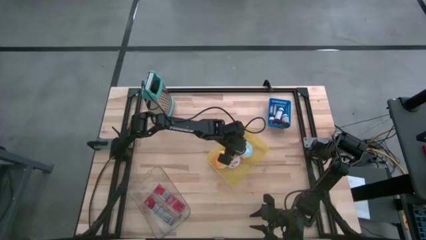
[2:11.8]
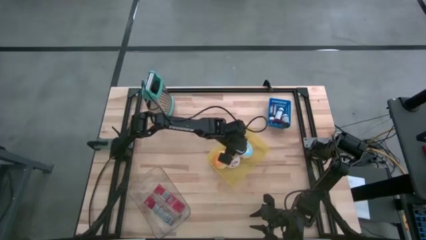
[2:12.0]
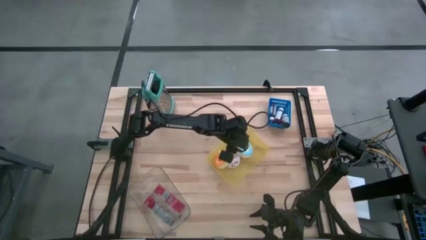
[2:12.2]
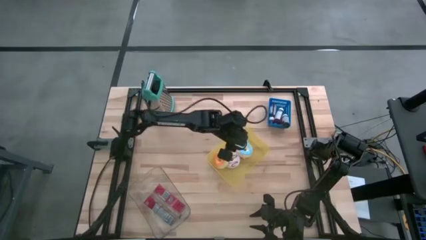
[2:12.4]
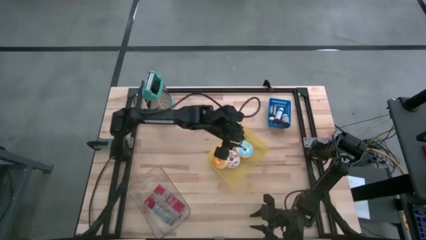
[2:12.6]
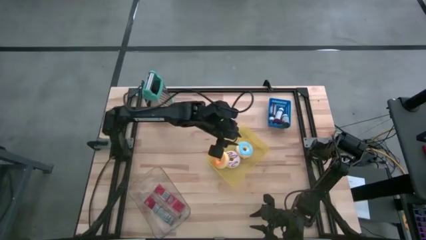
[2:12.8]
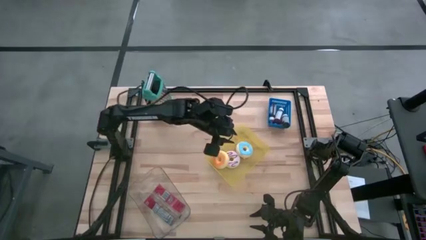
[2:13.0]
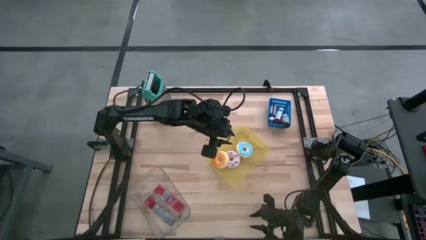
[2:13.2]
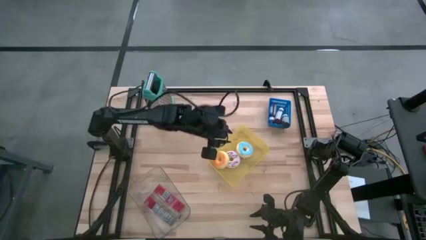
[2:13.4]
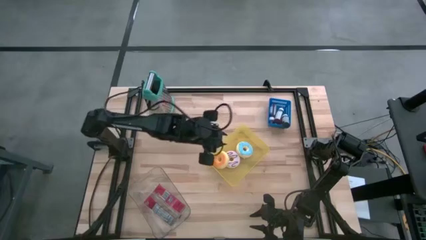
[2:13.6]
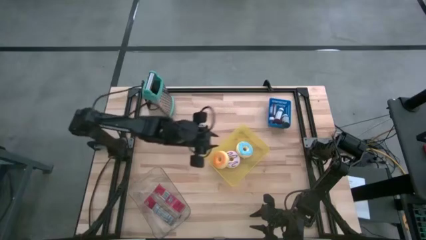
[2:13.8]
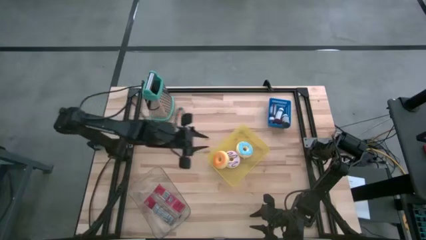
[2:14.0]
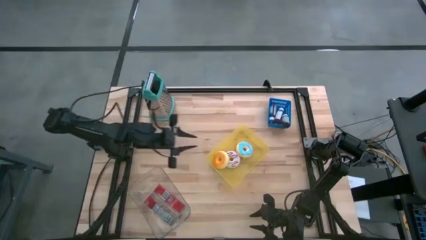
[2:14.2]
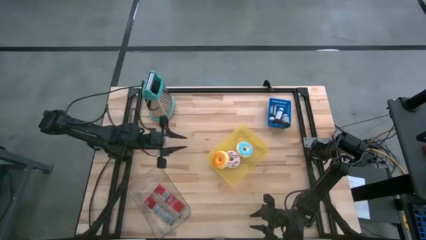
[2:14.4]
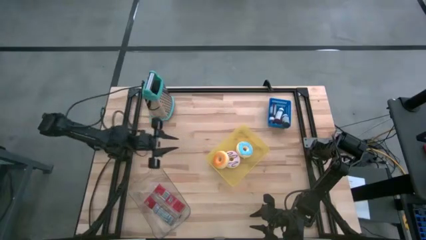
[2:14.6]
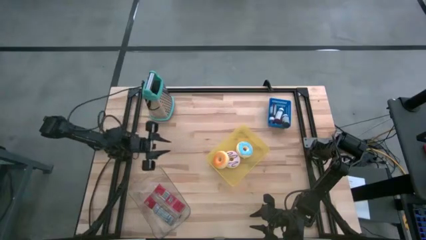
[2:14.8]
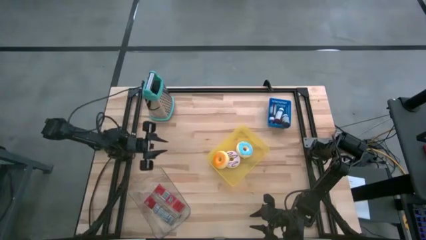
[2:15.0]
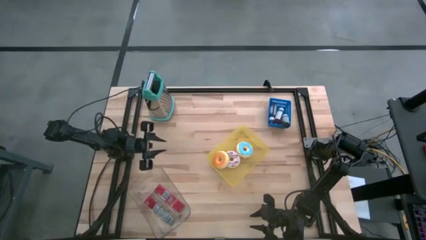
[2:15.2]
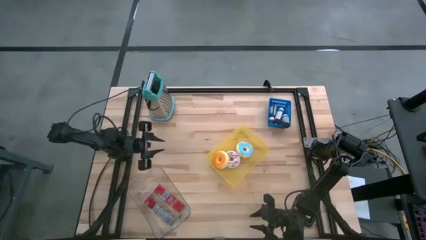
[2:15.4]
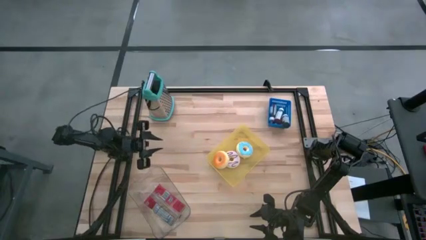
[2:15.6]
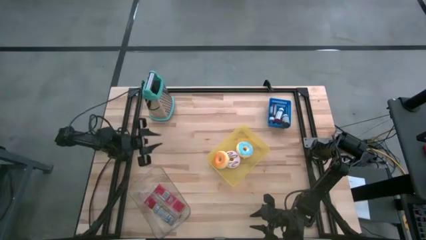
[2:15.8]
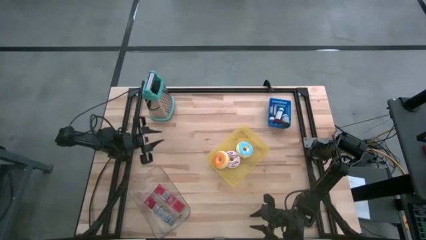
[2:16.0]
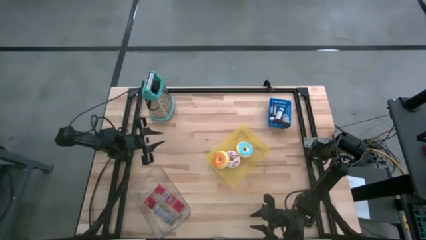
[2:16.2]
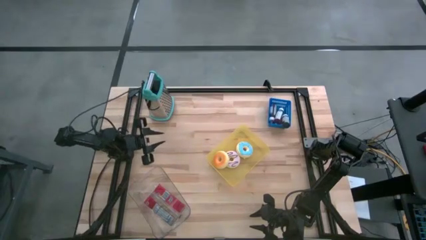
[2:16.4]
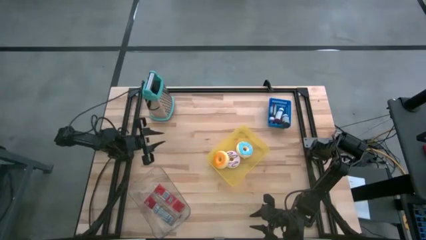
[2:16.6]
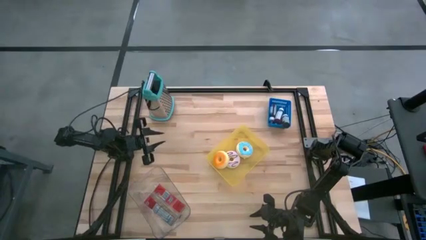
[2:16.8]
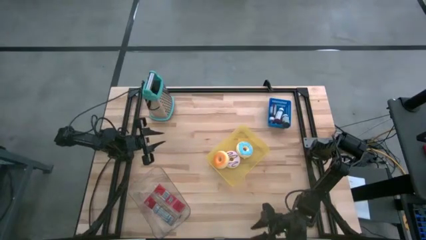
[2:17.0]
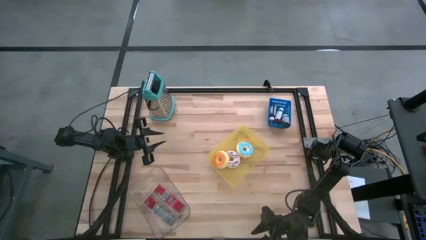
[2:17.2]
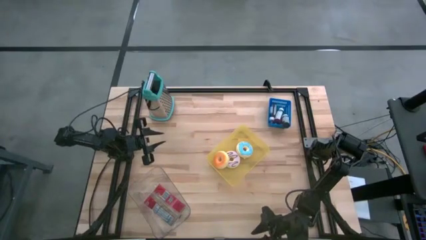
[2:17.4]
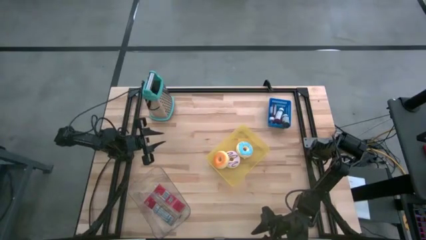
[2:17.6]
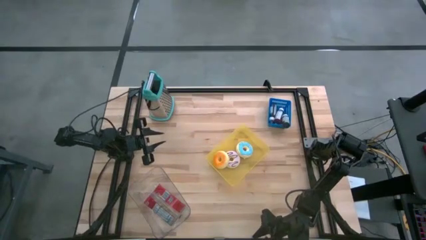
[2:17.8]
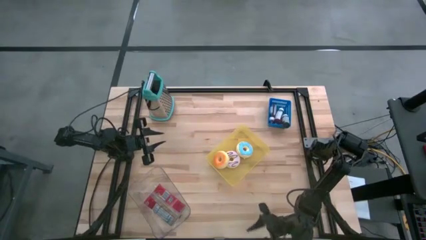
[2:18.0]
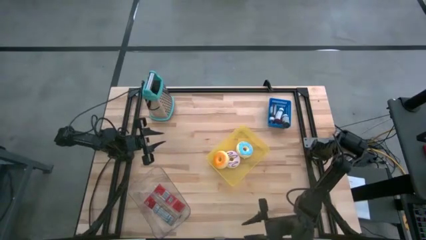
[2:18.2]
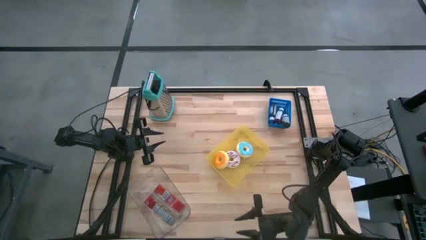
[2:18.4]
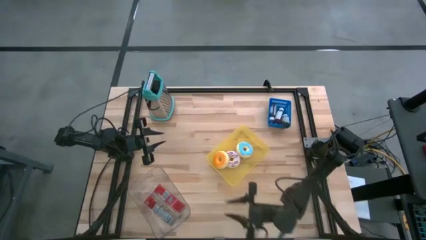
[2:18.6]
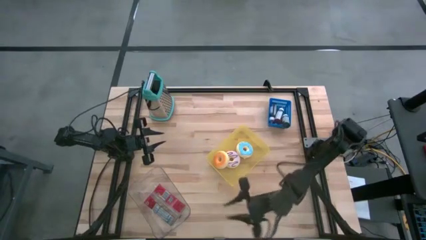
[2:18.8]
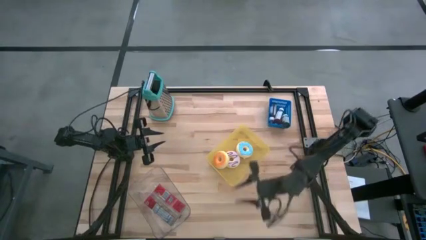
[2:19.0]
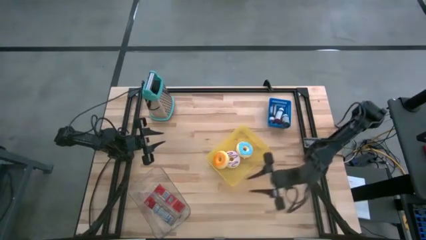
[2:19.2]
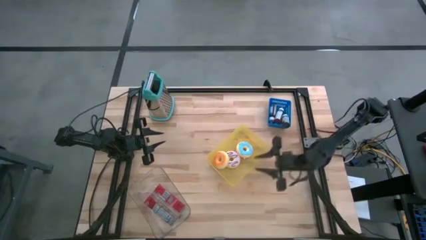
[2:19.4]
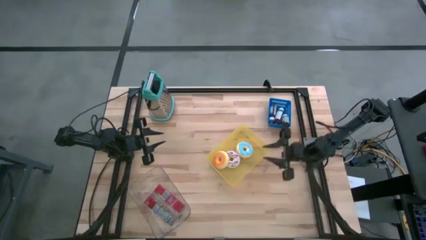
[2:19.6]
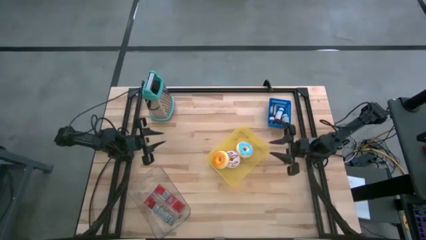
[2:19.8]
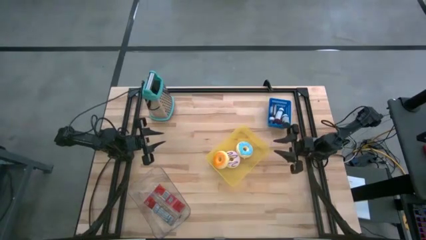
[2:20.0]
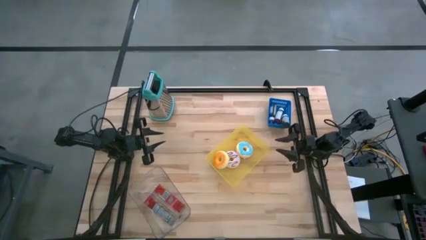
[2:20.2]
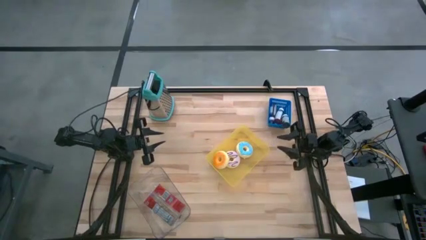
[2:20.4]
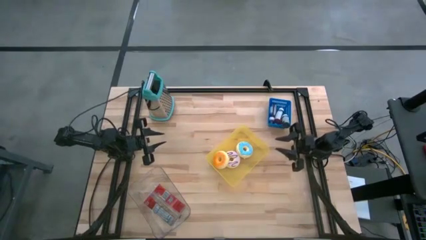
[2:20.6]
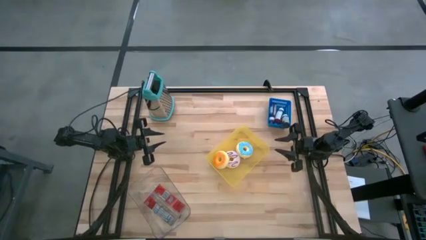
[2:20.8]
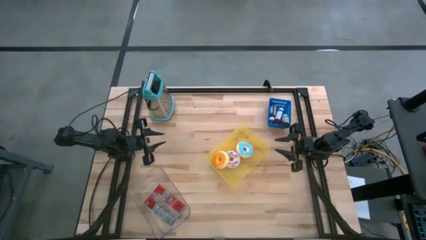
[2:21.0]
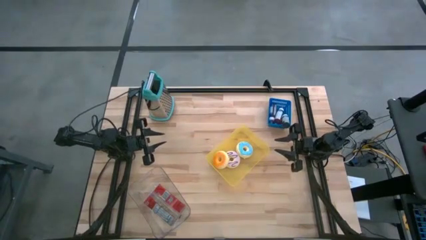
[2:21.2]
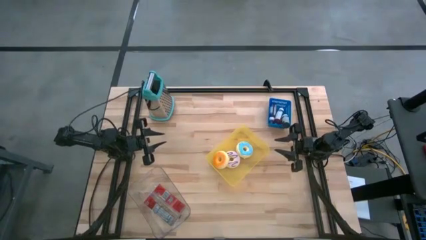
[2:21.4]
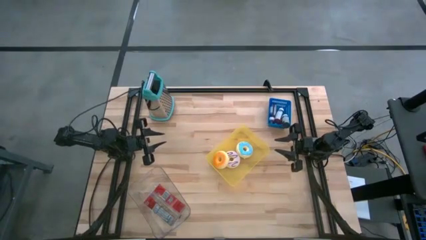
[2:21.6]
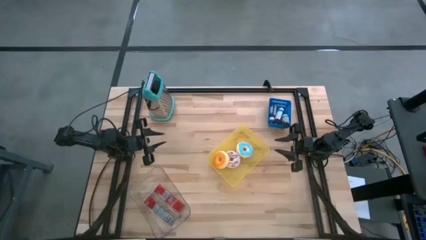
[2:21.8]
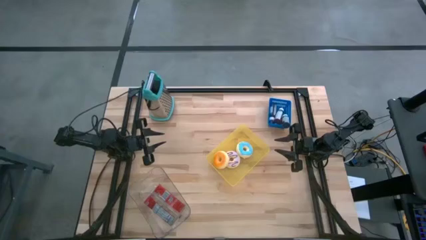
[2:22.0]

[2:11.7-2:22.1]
Task: Pick & Place Food Item
Return to home position

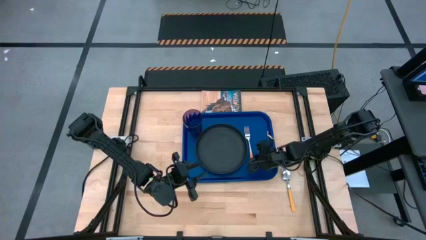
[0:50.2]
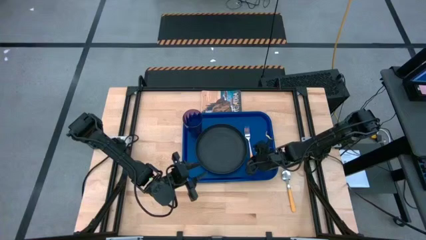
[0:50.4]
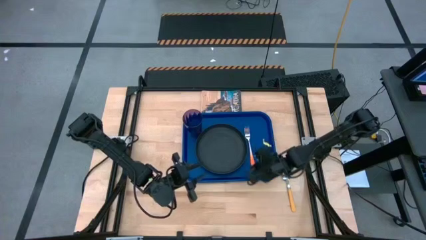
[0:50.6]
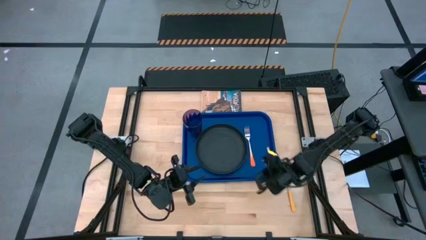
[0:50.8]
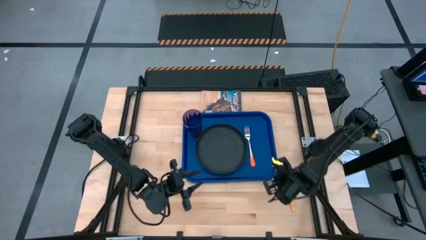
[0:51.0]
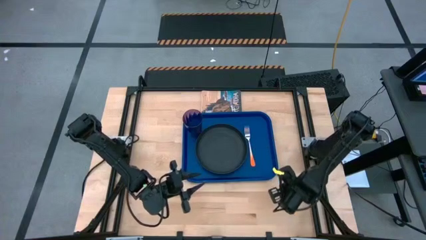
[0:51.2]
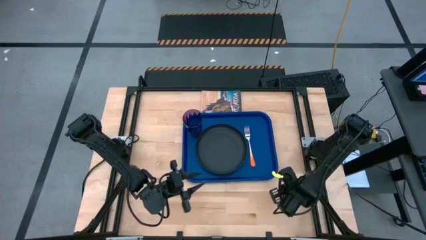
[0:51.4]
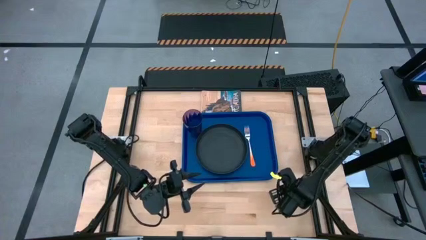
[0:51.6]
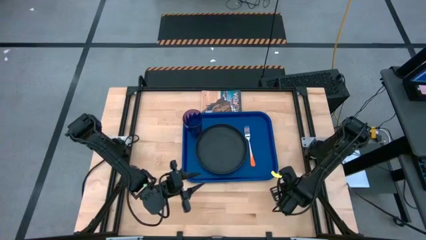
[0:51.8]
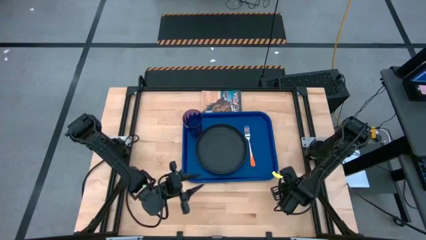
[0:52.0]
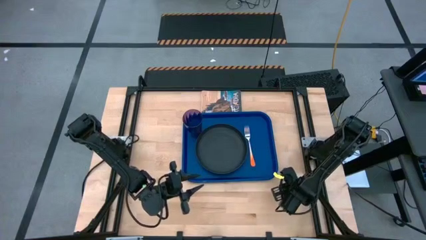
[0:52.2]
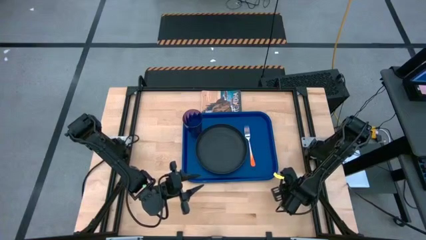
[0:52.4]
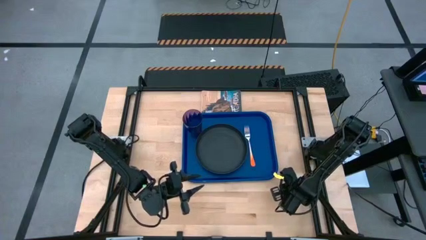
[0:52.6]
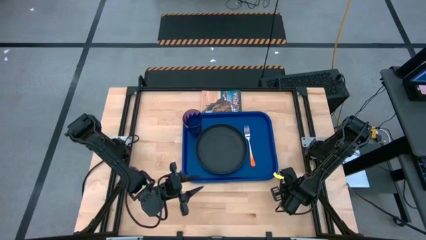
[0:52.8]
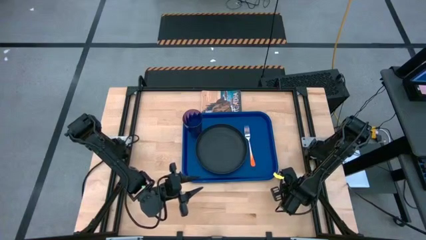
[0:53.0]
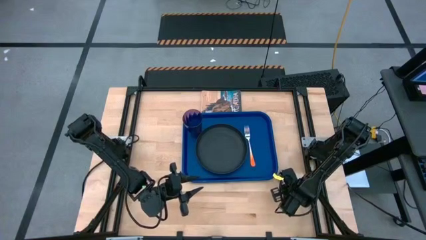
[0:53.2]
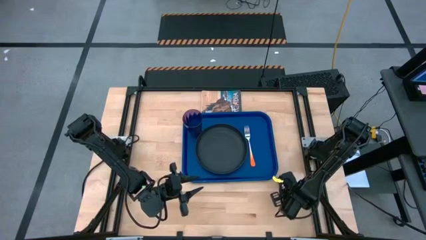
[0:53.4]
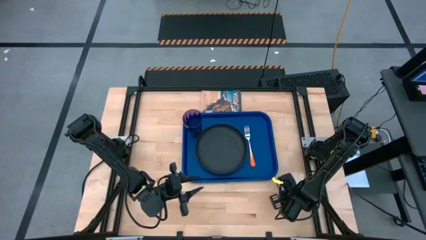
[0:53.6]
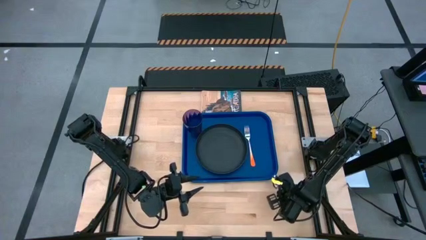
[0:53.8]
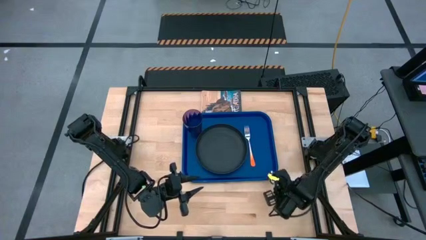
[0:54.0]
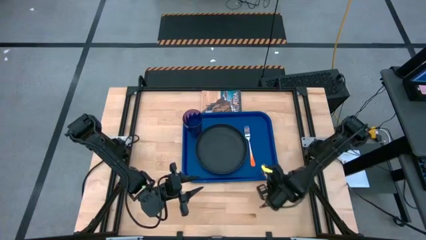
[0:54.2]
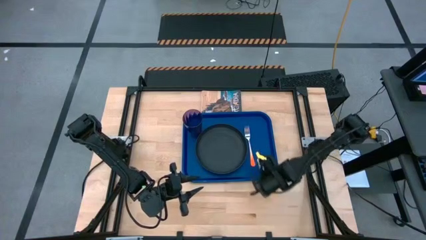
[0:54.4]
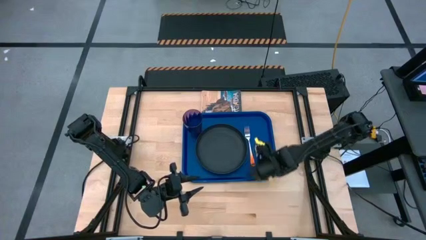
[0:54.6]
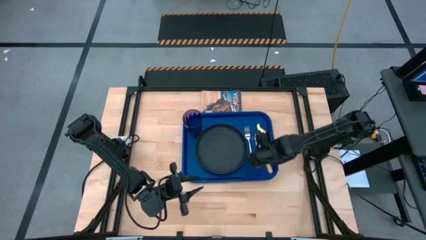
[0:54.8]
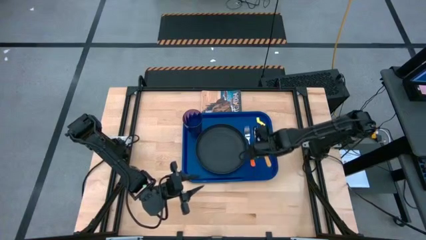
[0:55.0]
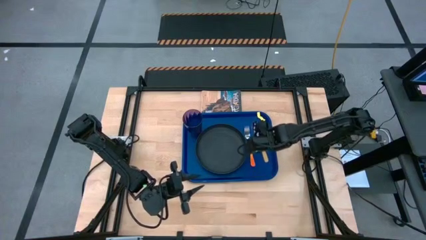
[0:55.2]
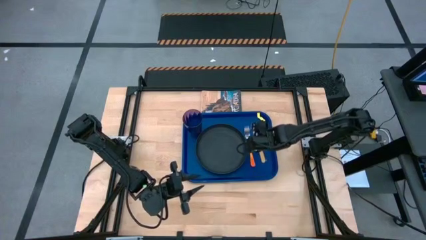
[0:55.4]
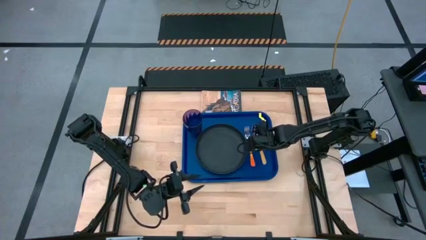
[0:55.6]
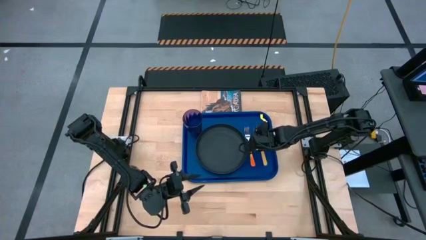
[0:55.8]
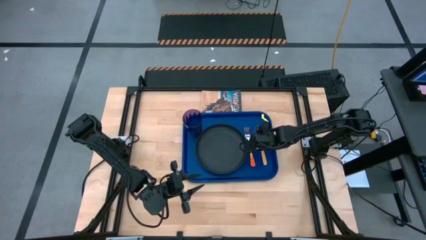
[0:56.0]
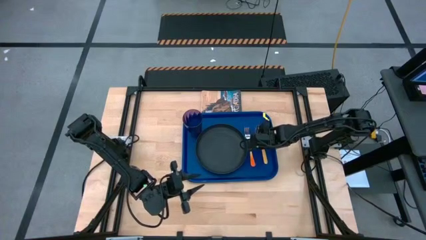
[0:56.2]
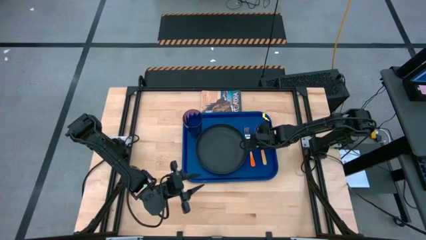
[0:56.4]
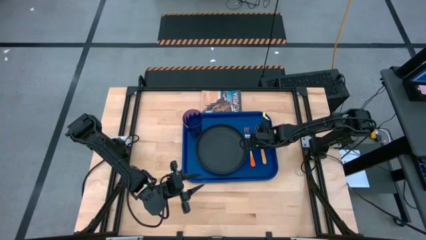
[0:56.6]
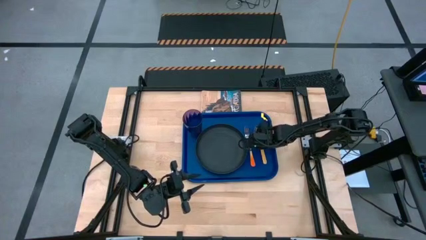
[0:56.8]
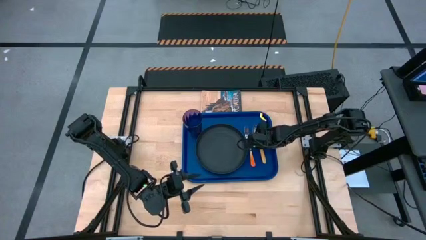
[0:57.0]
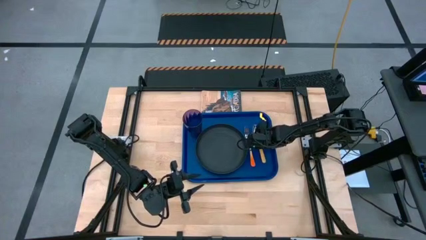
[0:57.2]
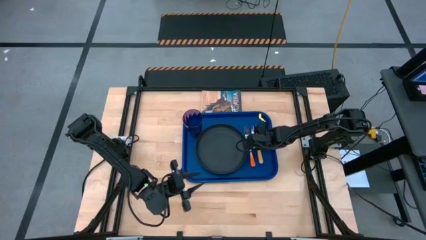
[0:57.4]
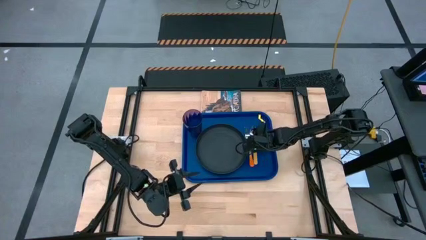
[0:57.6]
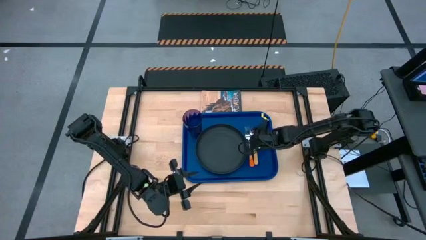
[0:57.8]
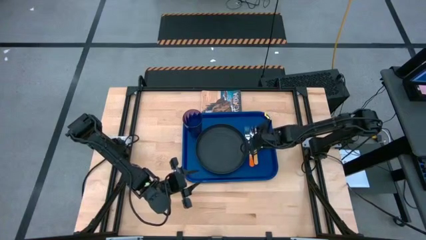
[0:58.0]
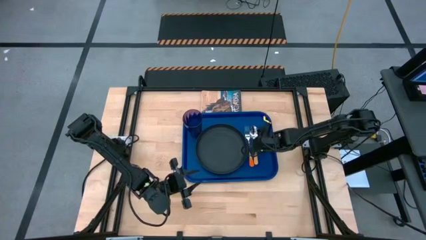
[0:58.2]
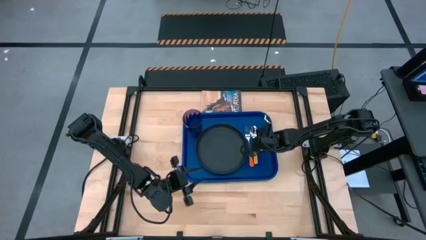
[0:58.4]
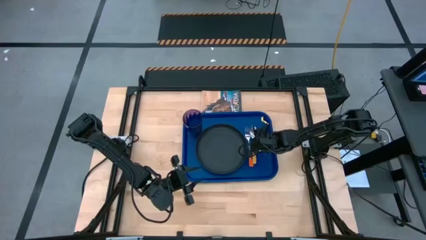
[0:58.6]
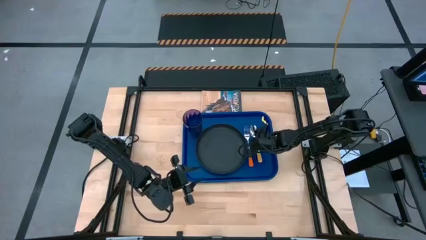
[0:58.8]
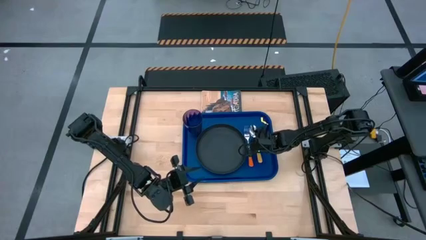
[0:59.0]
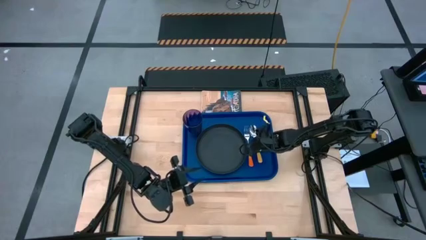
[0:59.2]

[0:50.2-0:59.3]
Task: Pick and place plate/cup/fork/spoon on tray
Put the yellow spoon on the blue serving tray to the right of the orange fork
